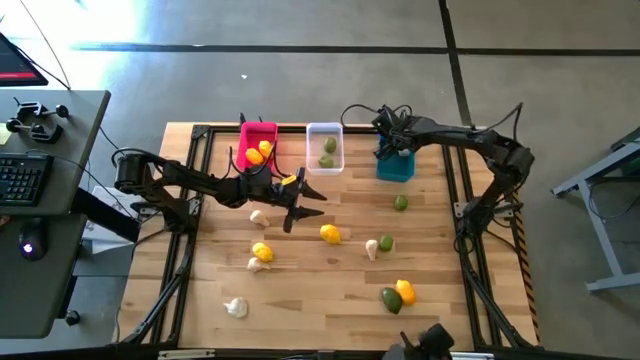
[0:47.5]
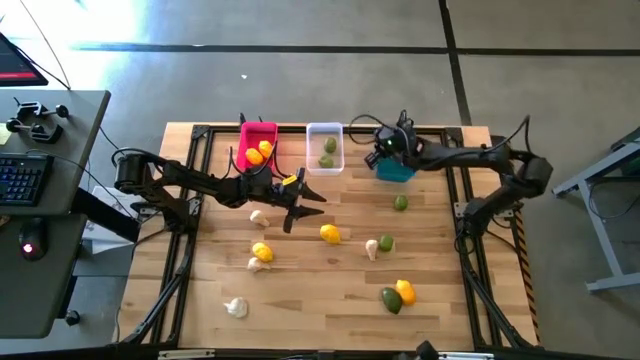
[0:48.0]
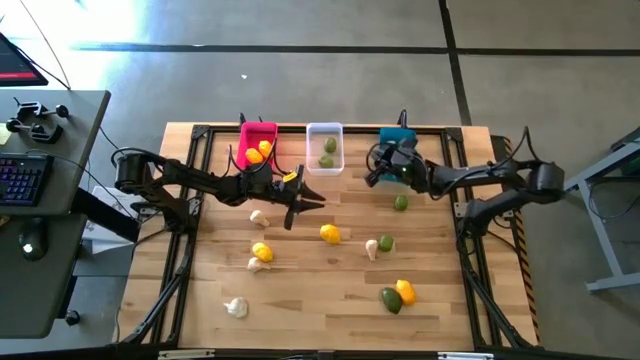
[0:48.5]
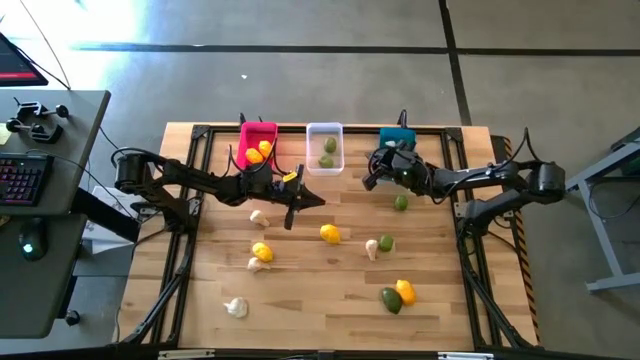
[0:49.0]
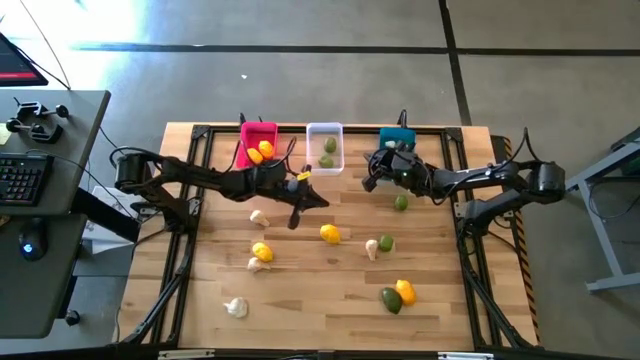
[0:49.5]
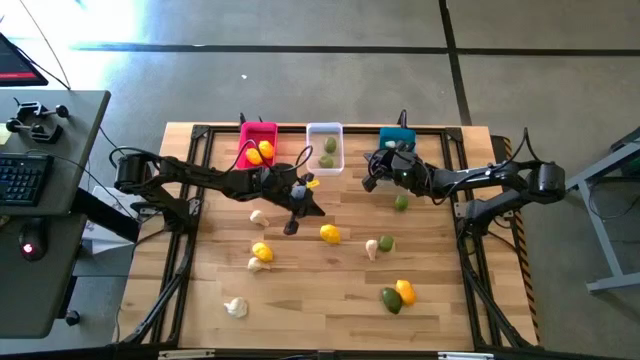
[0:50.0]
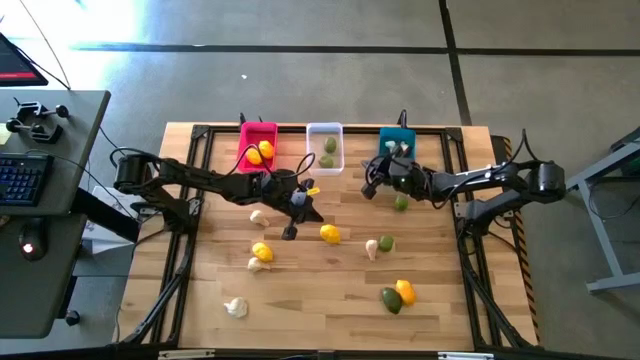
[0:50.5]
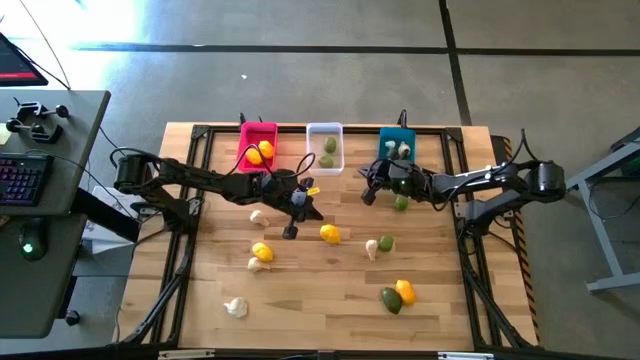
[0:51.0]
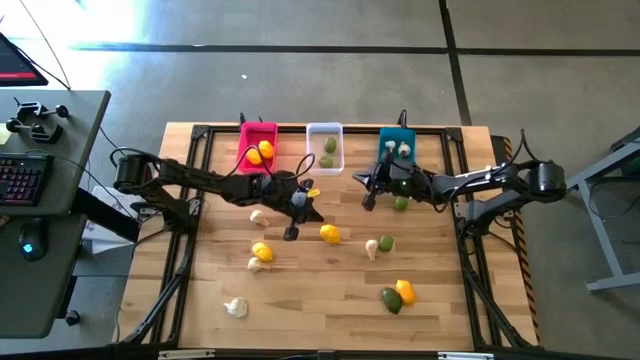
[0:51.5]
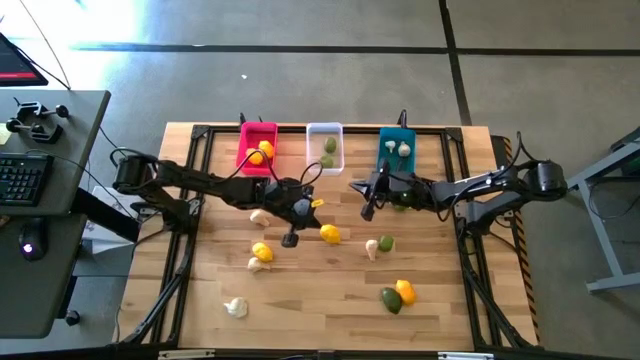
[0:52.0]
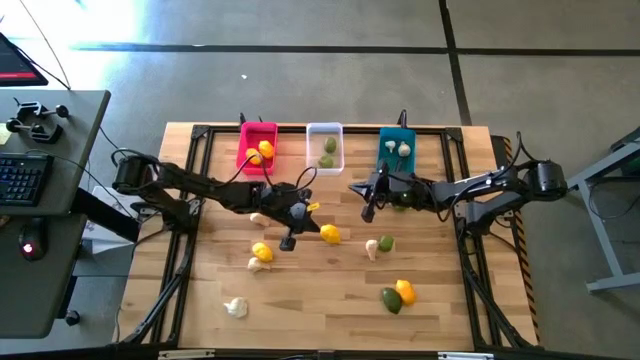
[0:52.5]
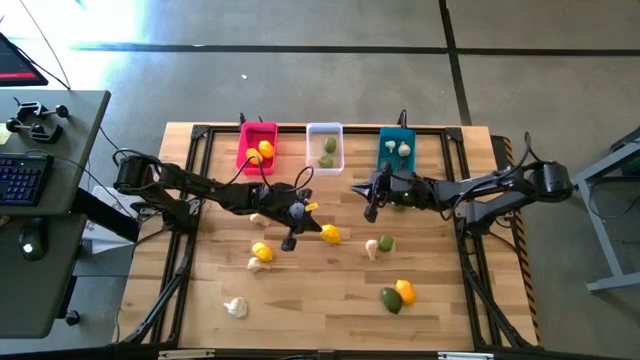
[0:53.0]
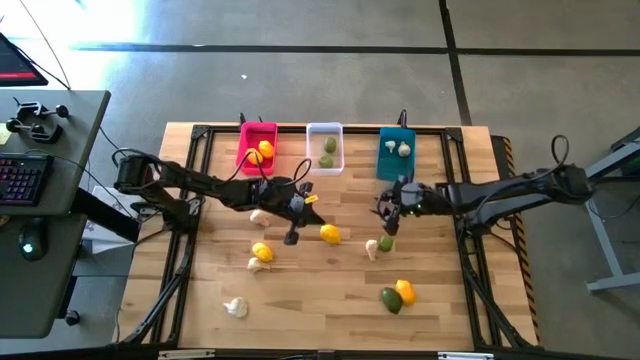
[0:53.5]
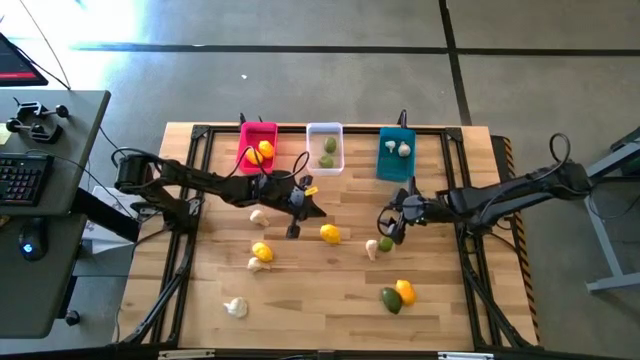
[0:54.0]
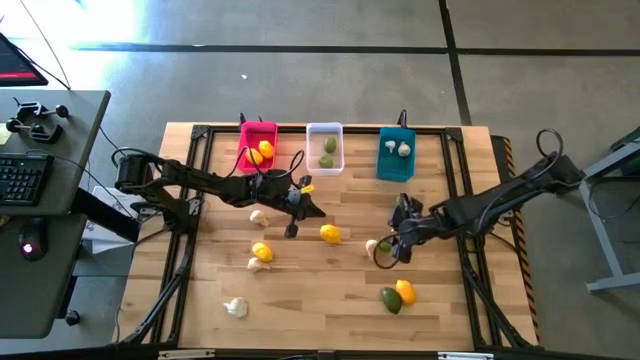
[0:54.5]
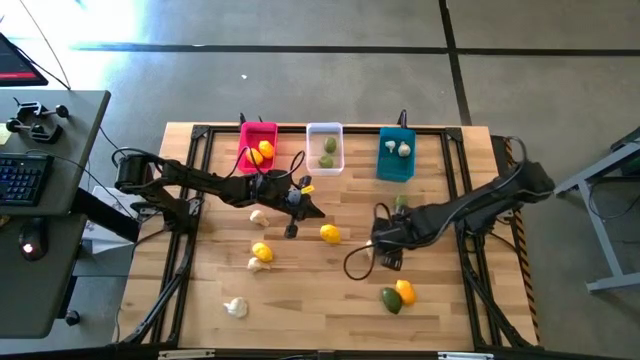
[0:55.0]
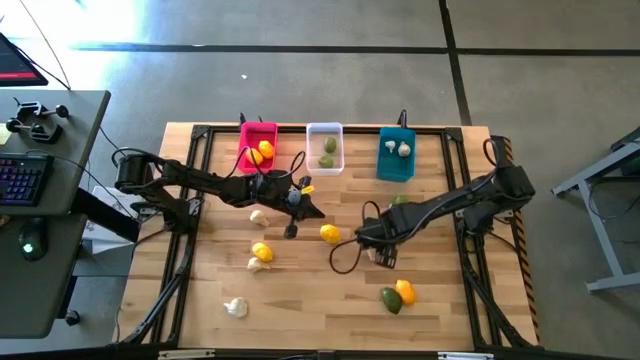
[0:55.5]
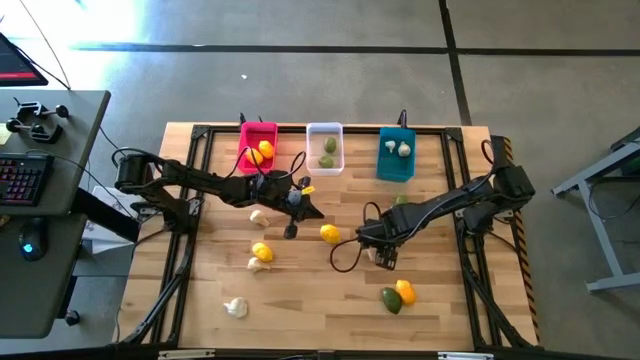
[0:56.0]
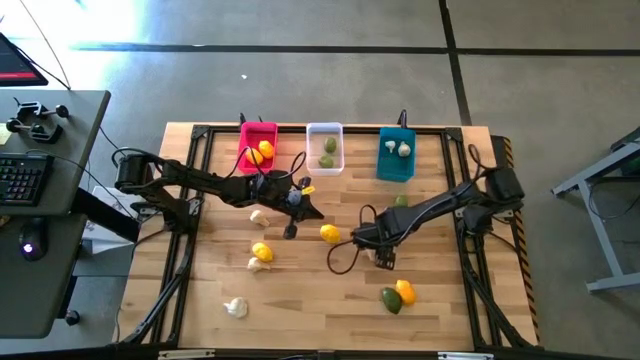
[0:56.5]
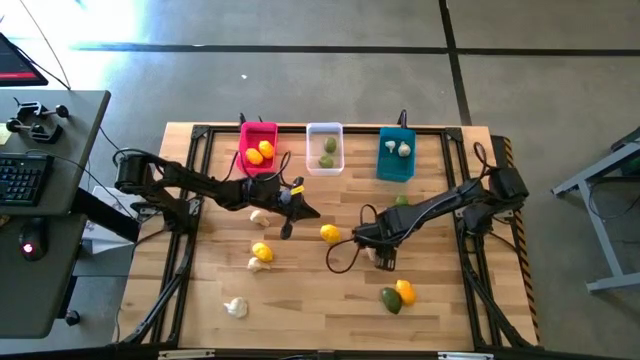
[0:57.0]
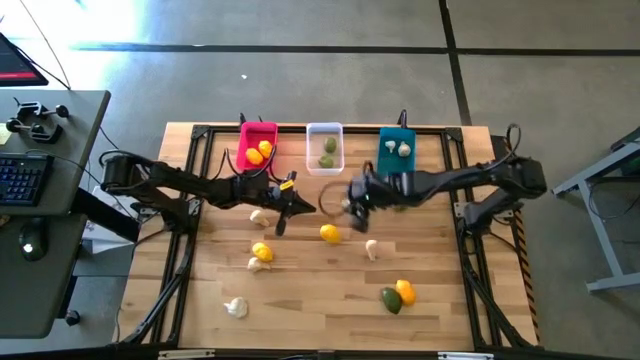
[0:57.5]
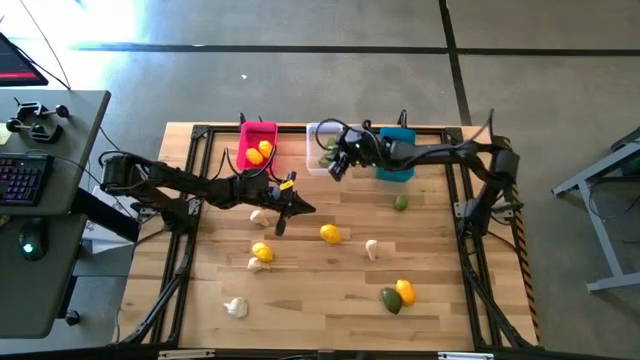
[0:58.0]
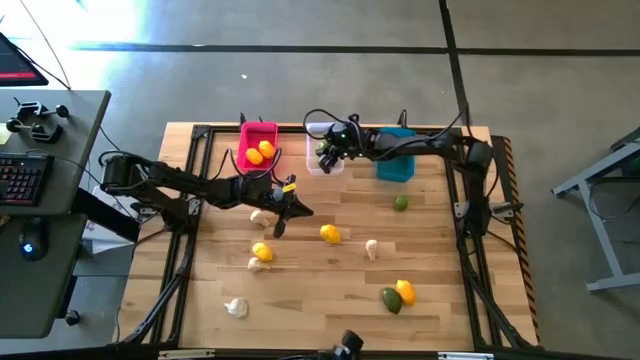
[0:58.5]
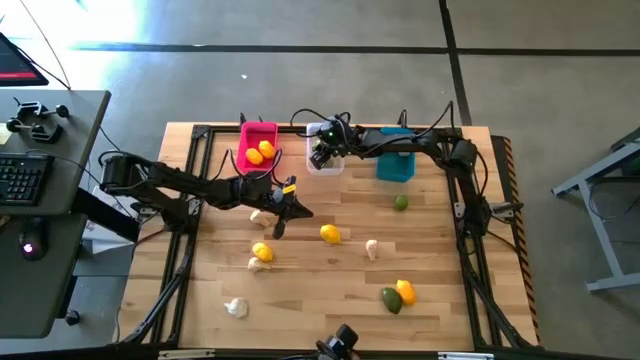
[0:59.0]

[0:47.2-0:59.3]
Task: Sort produce into baskets
Put the lime into the transparent bin

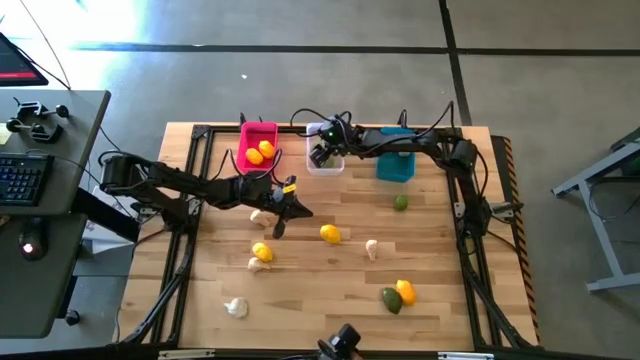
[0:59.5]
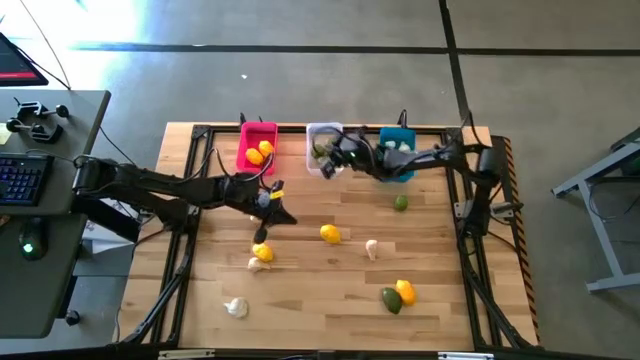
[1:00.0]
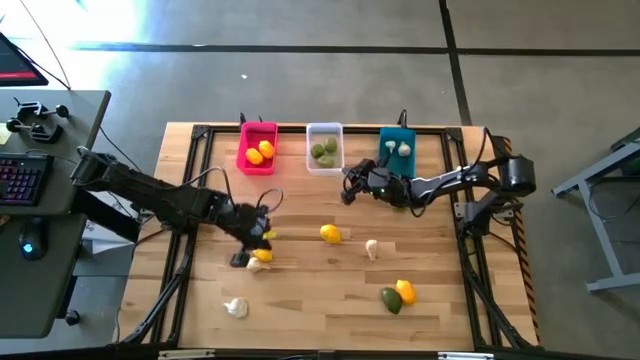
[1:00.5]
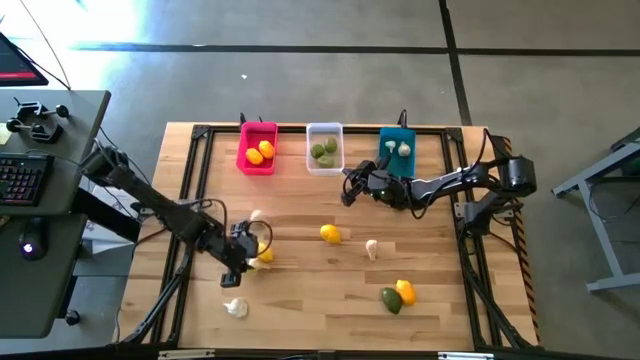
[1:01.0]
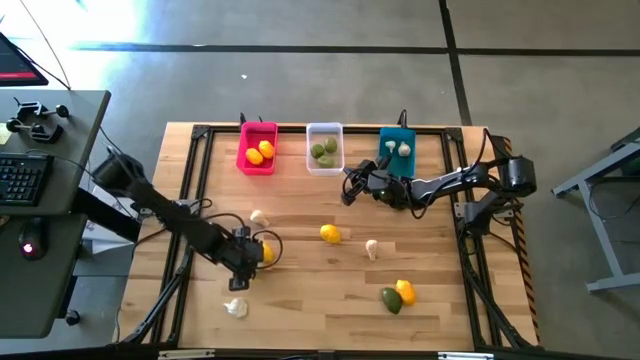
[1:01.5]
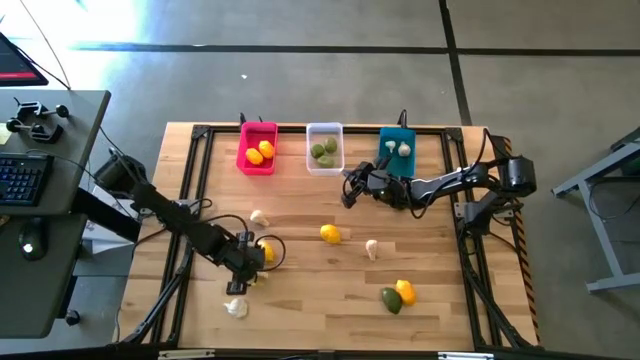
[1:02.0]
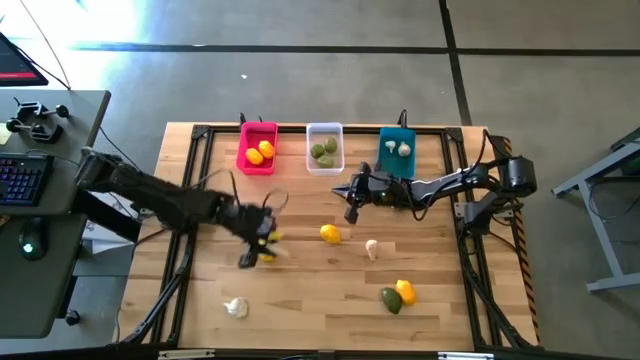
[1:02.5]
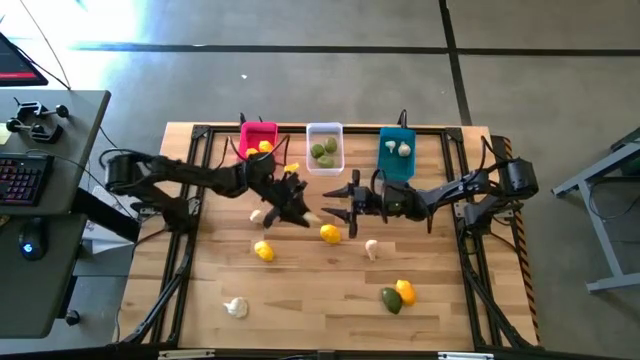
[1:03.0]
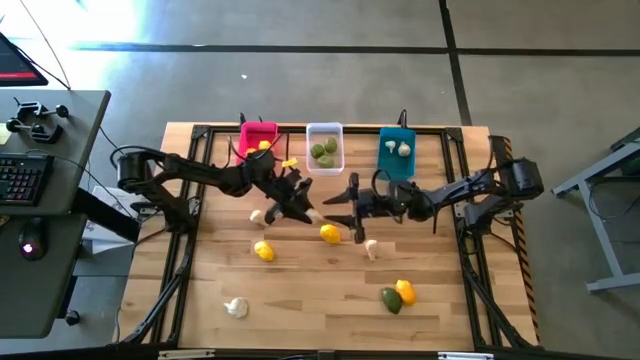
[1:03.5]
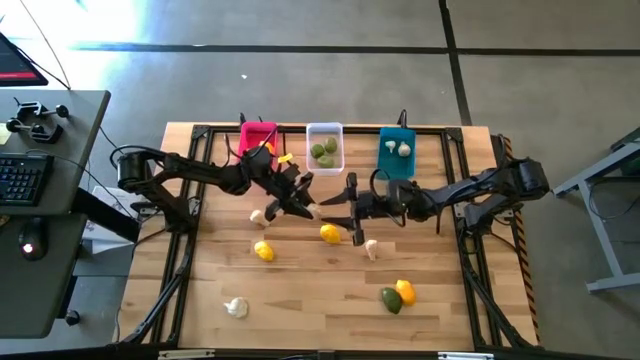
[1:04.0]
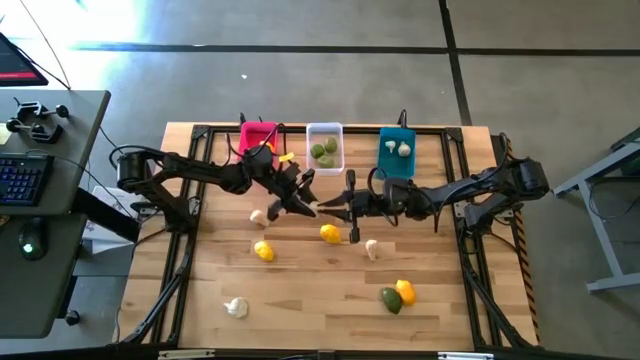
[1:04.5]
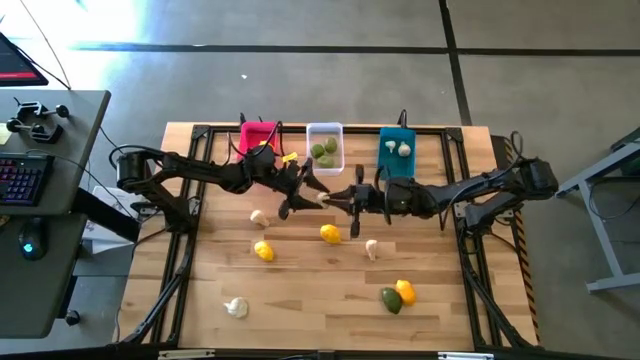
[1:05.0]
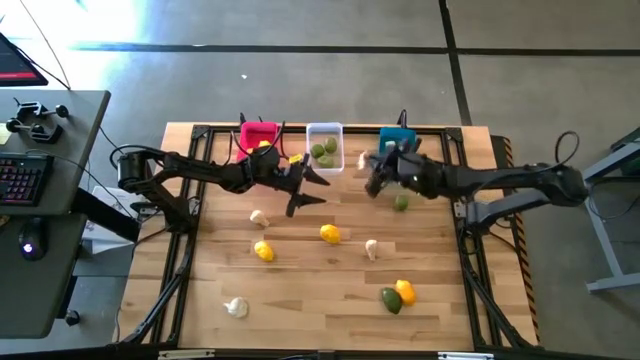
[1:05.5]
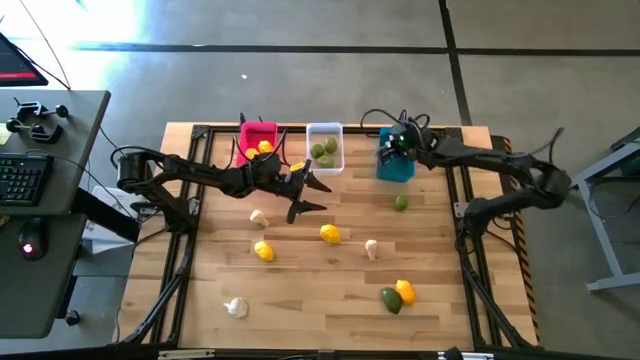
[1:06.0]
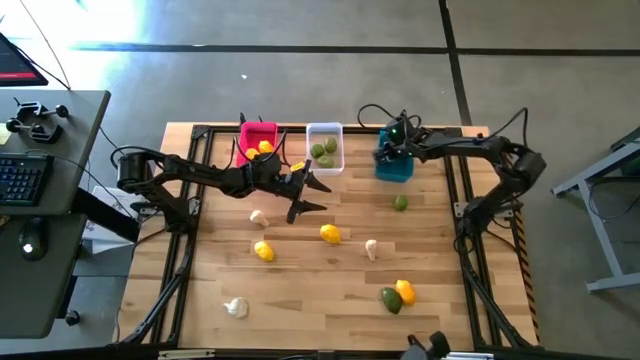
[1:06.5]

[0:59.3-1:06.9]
Put the white garlic into the blue bin

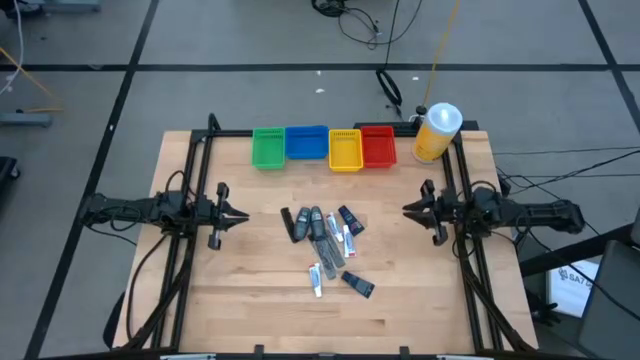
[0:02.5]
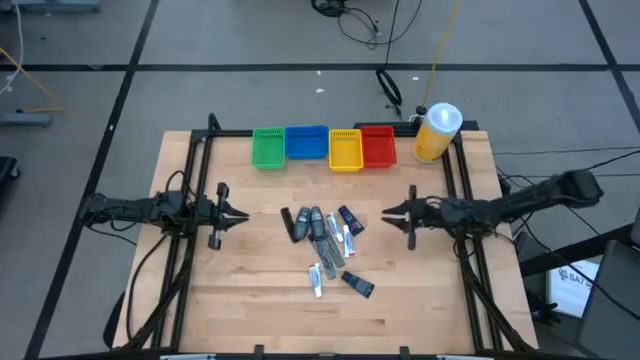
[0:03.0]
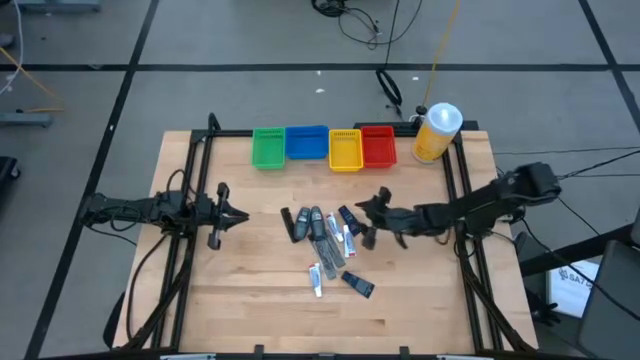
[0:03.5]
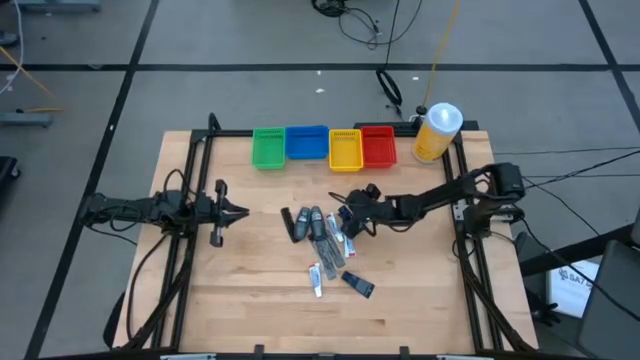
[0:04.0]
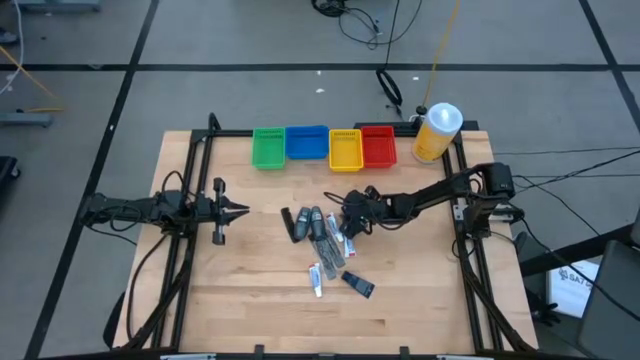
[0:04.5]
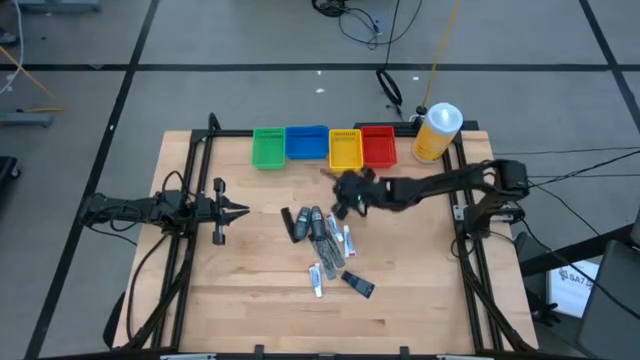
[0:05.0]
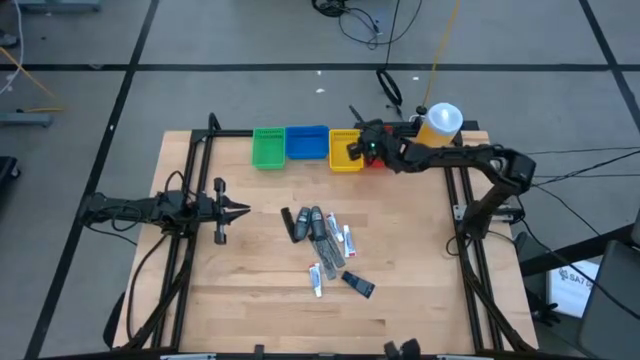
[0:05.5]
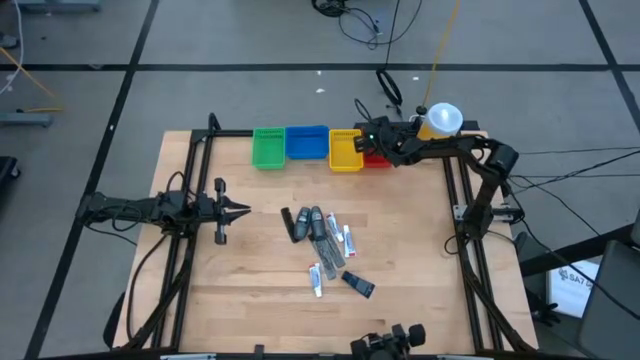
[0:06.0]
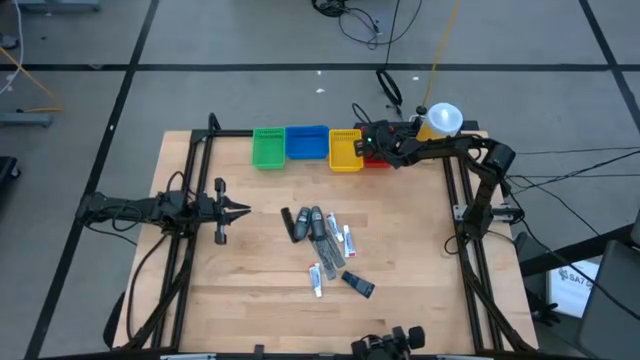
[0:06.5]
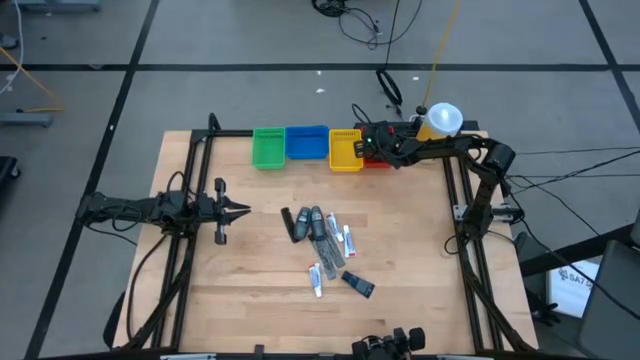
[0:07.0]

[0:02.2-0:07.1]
Task: Pick & Place Travel size toiletries
Put the top blue shave cream on the red bin
